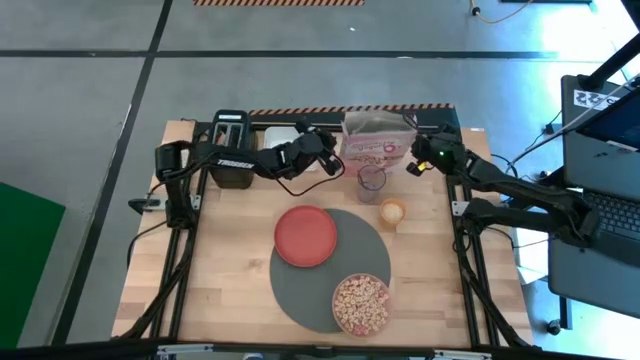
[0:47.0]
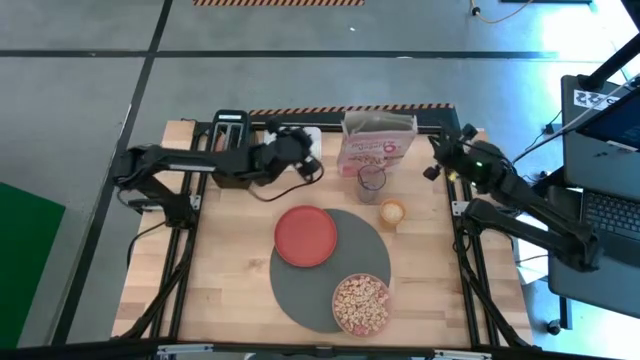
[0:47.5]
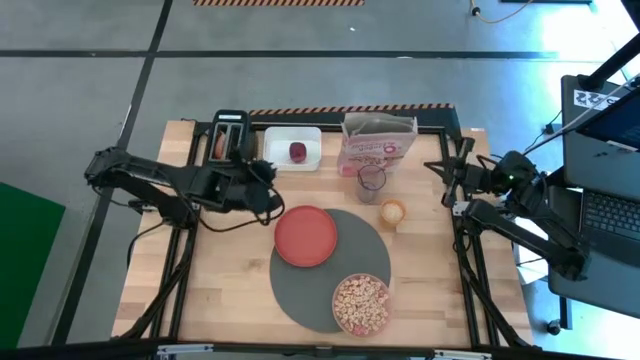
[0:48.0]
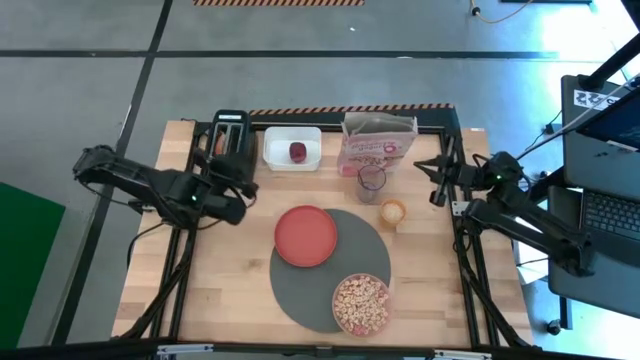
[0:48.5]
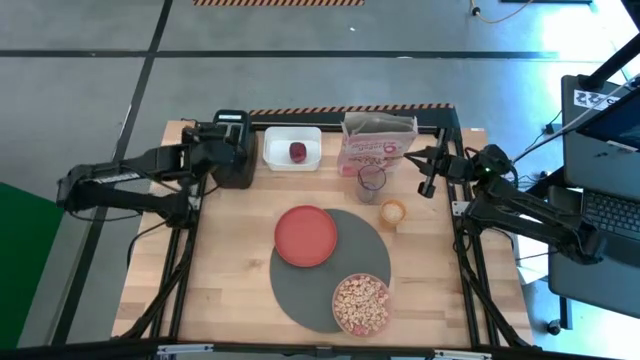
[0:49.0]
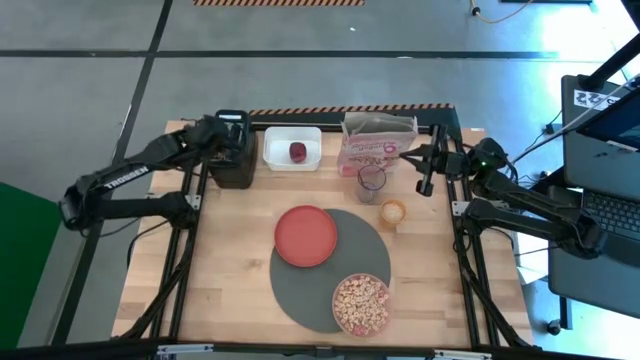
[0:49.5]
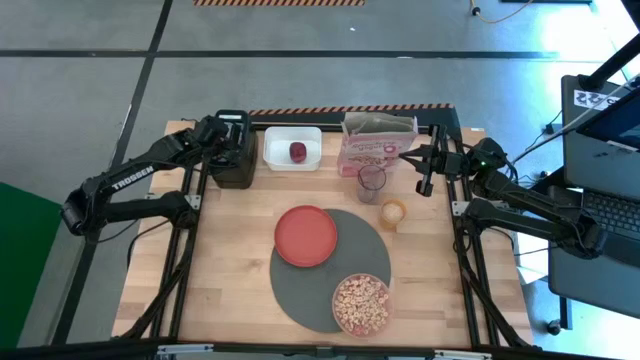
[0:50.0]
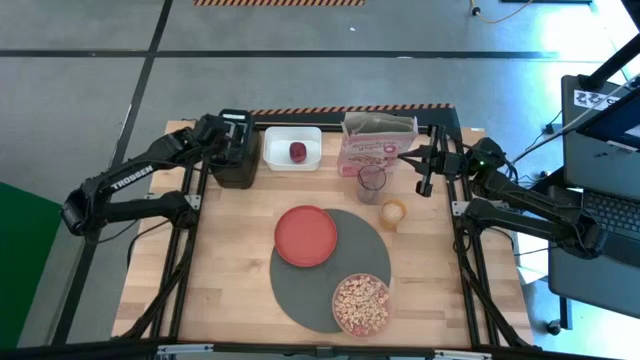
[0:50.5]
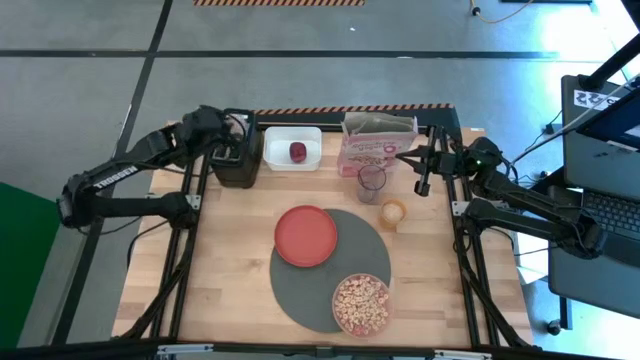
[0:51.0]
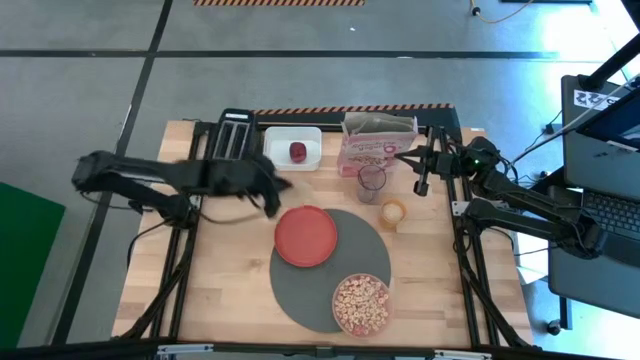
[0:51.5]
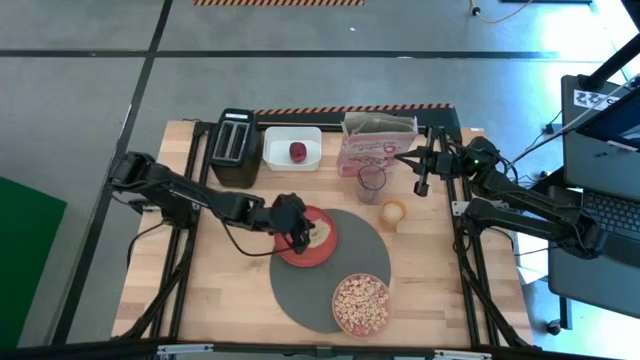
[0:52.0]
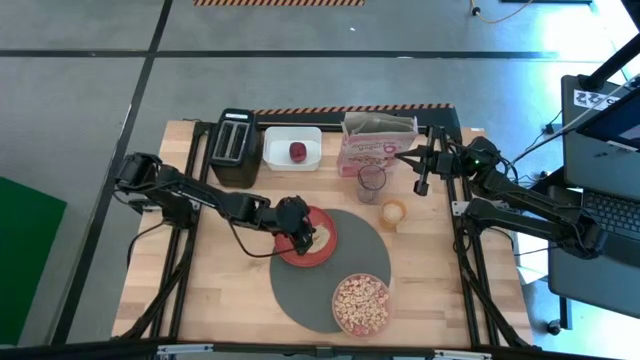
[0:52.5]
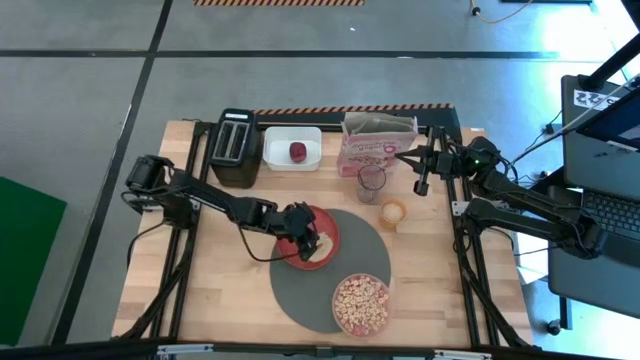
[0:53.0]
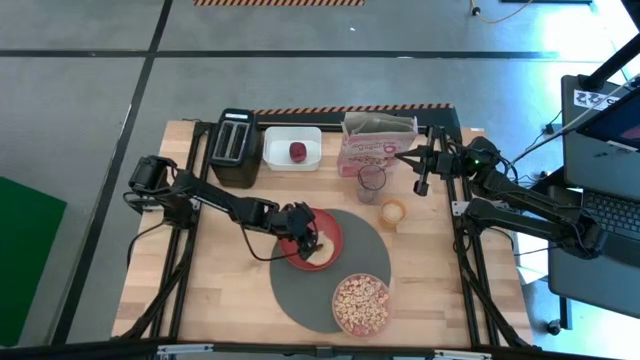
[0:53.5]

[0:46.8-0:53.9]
Task: Arrange a breakfast setting
Put the toasted bread on the red plate

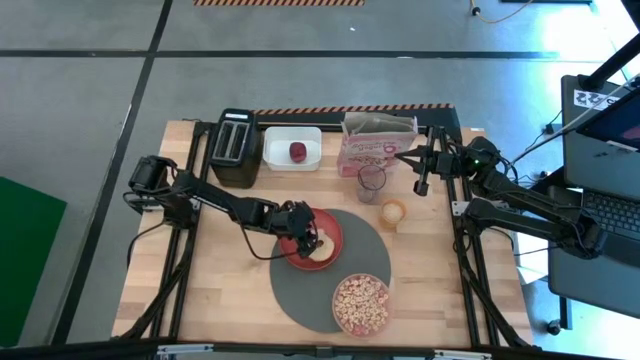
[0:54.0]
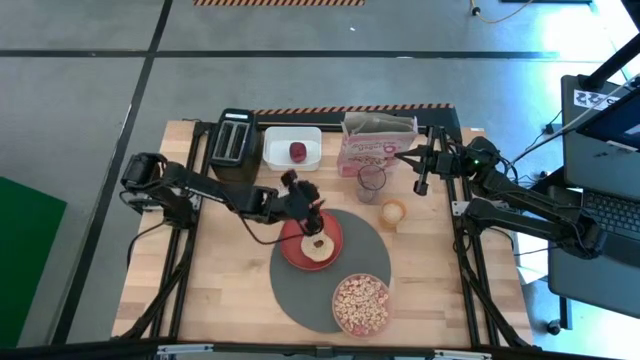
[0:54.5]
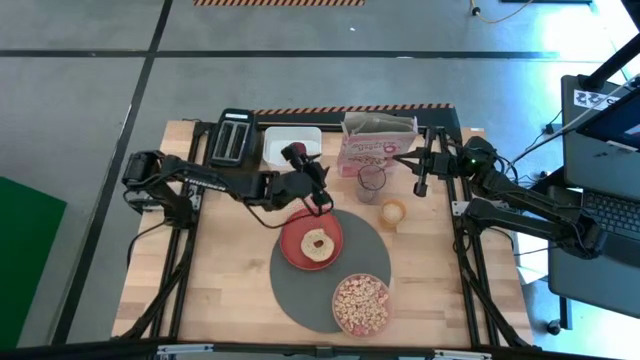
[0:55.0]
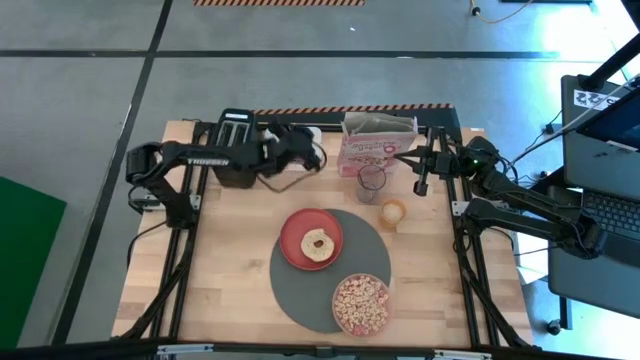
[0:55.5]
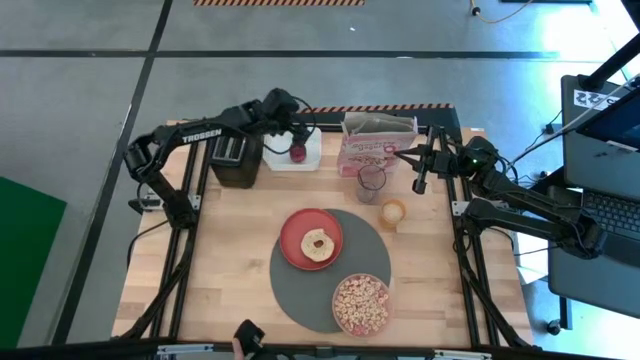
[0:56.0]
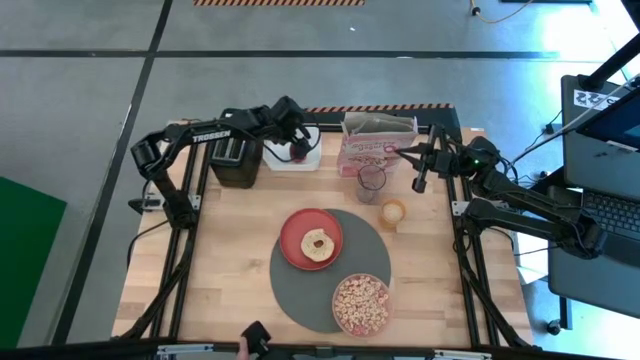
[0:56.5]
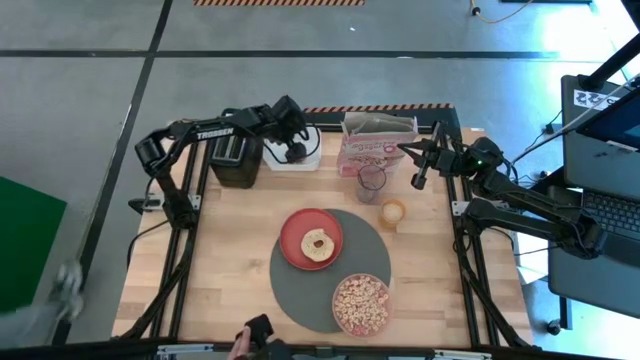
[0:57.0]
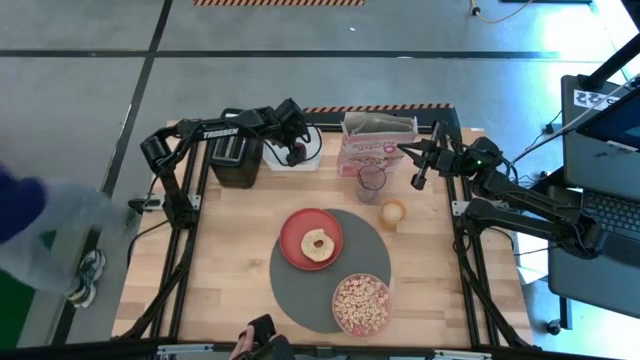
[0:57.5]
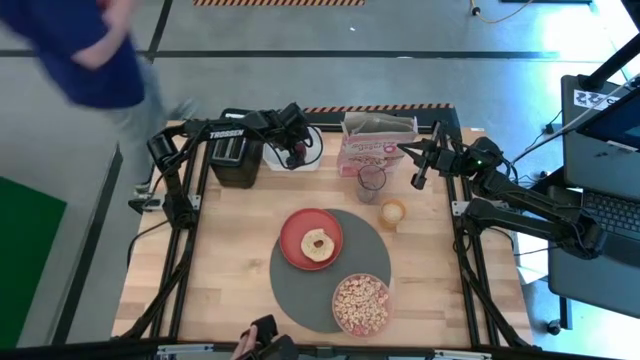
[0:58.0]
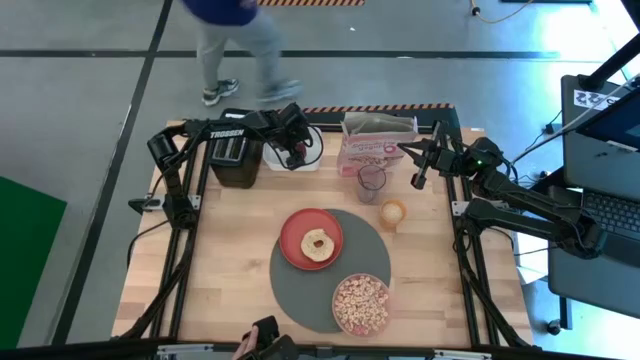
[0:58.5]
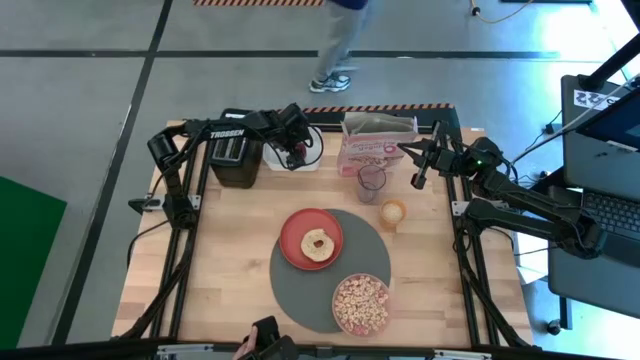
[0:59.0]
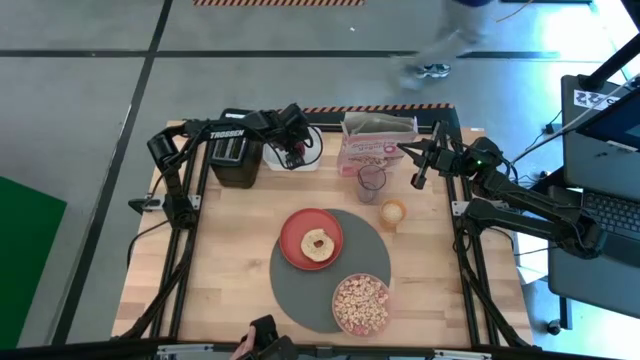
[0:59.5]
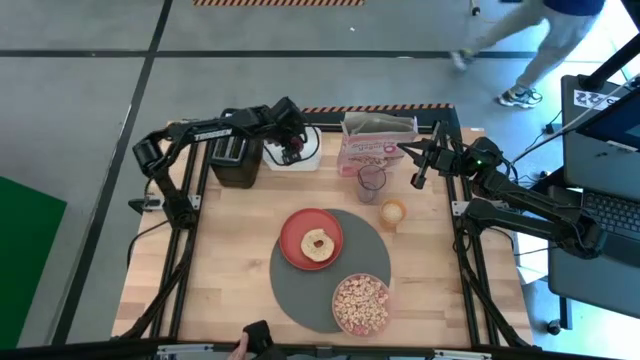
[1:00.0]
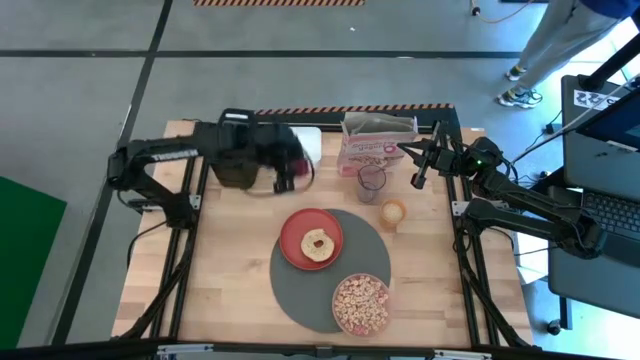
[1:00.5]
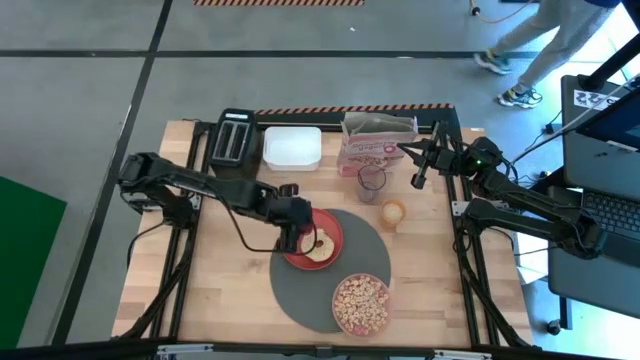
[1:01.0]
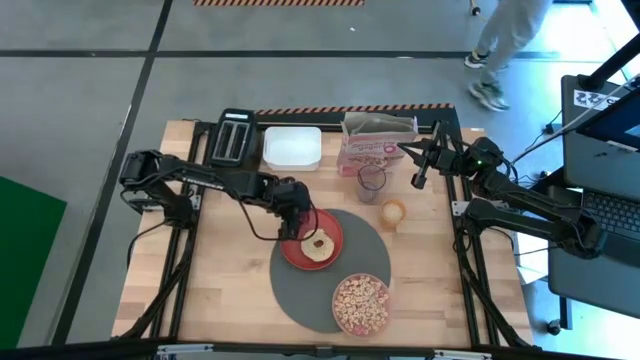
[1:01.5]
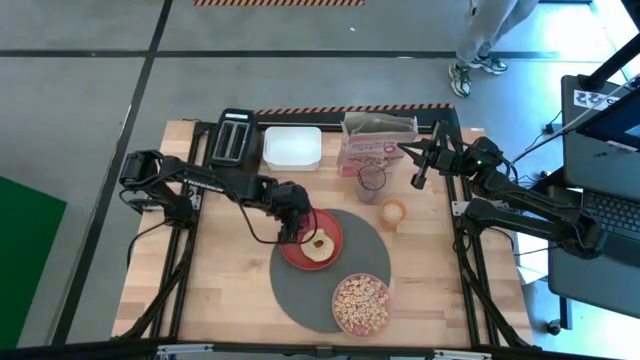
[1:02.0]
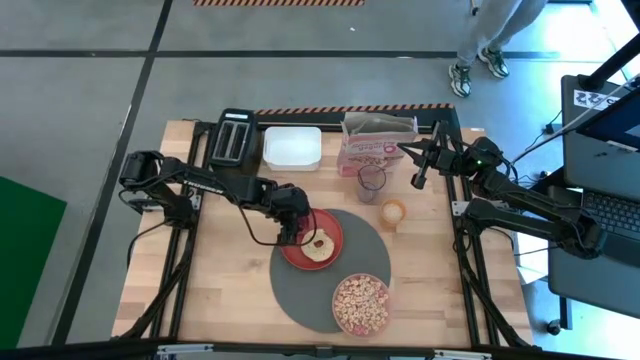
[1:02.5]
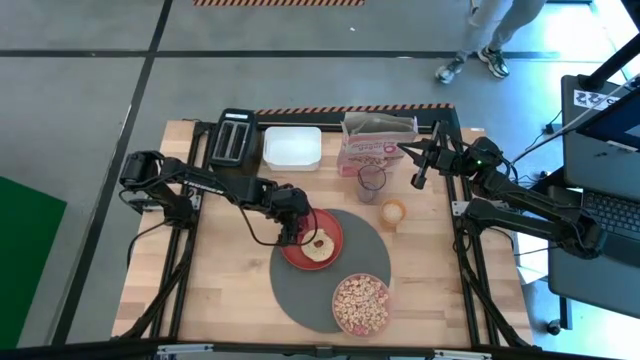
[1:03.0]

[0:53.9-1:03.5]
Put the apple on the red plate

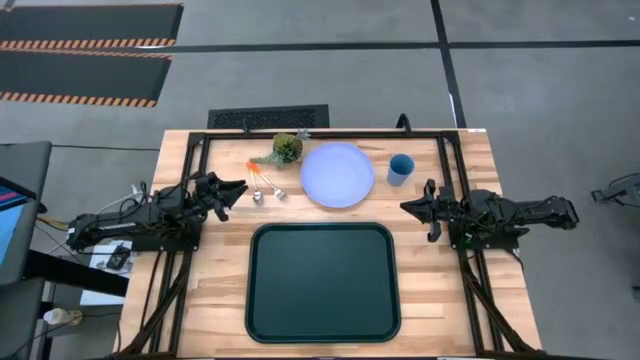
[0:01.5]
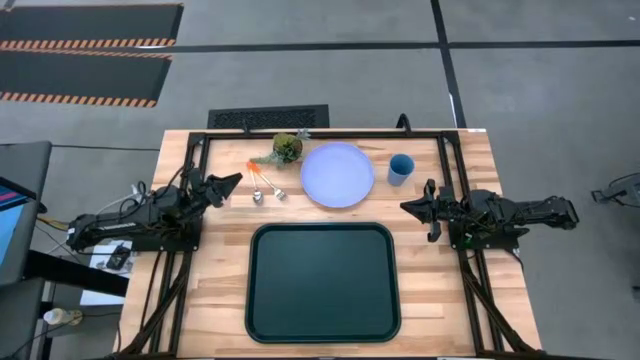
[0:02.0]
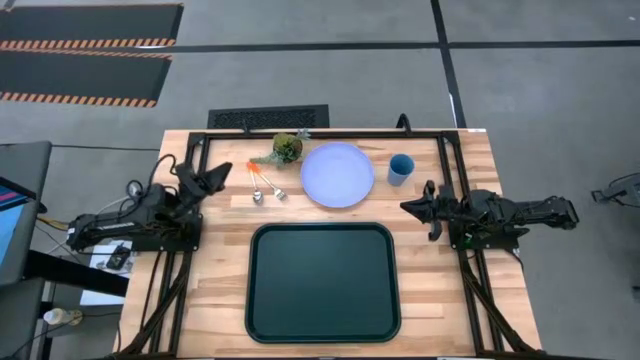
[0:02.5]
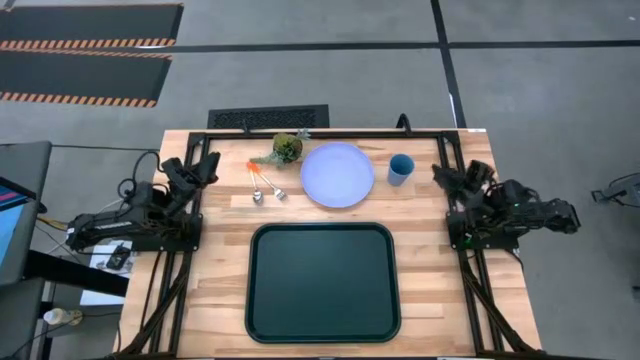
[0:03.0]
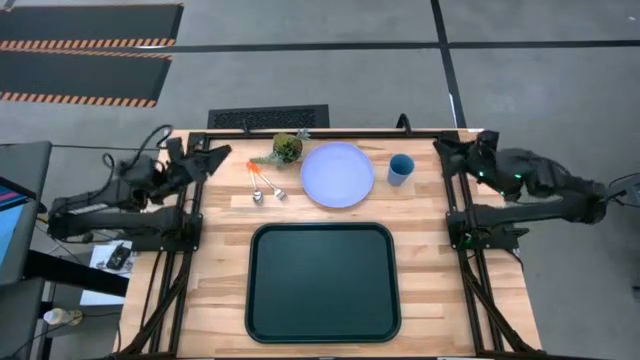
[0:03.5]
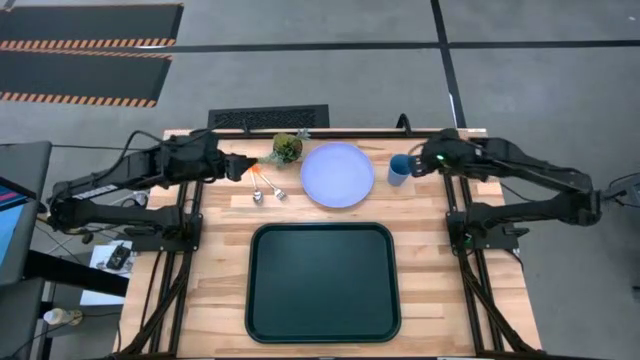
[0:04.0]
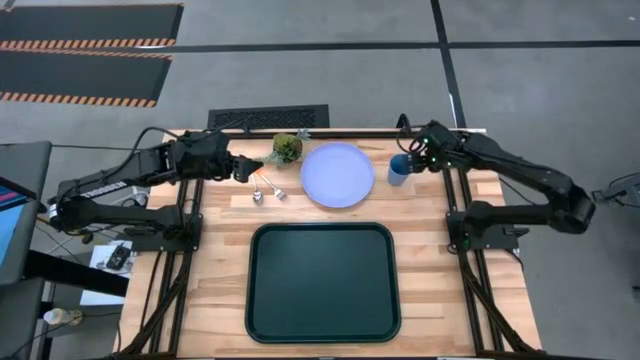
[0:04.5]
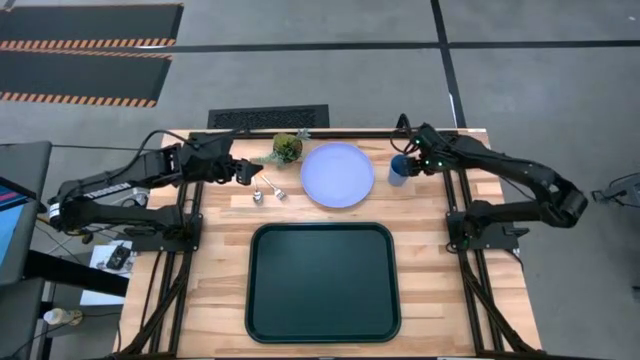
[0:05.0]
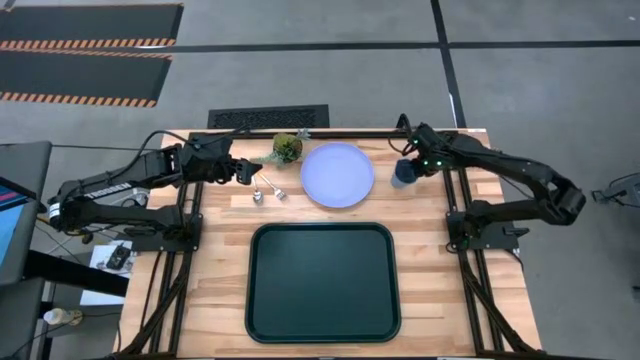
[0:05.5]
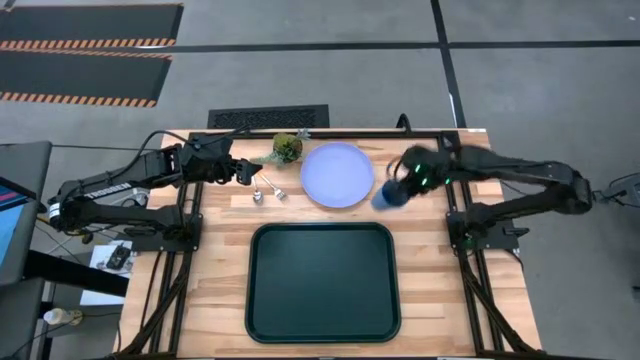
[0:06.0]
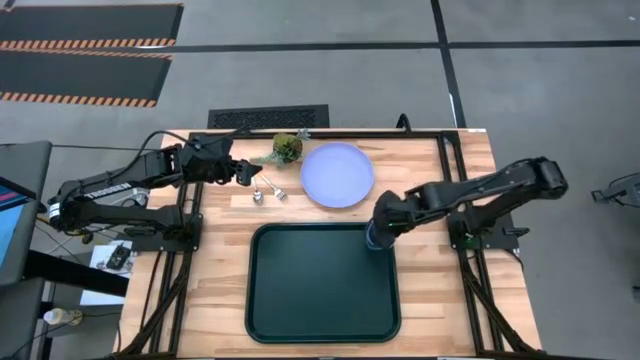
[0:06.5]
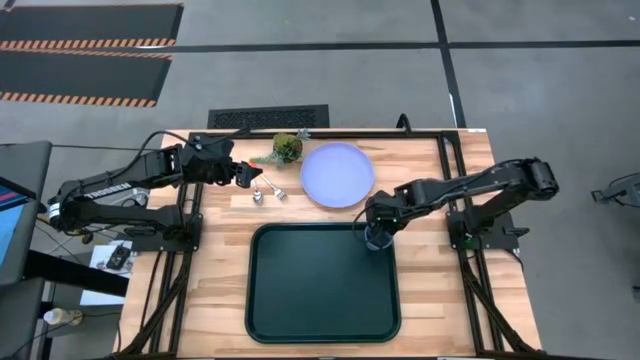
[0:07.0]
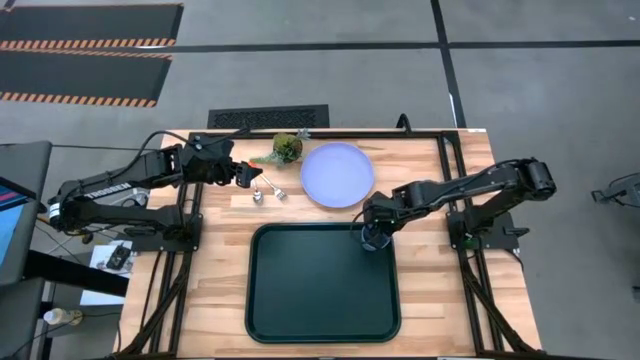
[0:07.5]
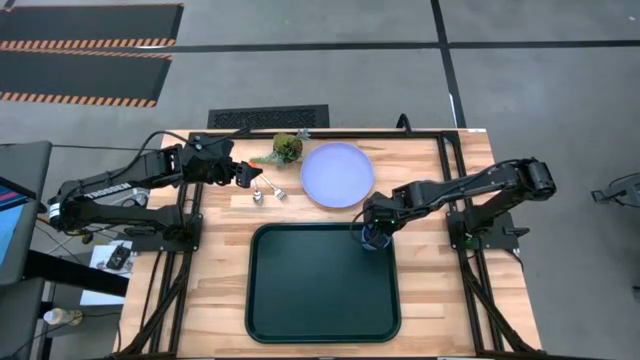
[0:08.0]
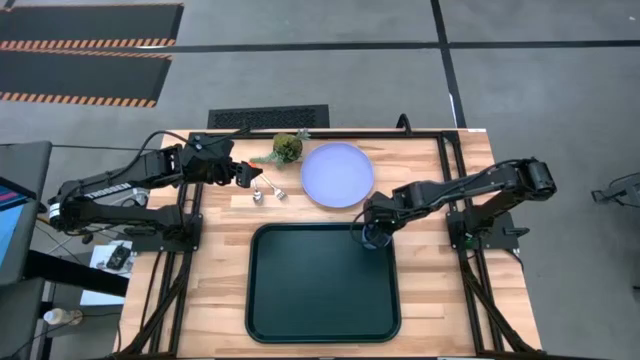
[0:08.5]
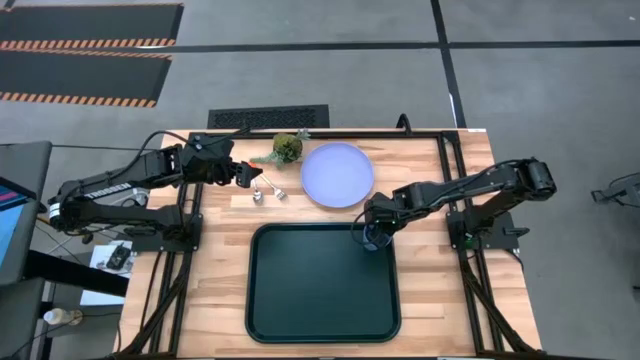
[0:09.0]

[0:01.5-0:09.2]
Task: Pick and place plate/cup/fork/spoon on tray
Put the blue cup on the top right of the black tray
